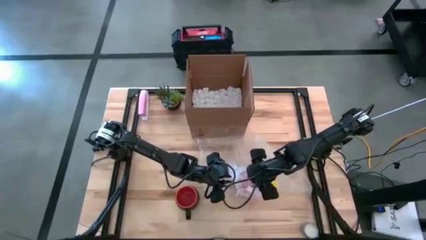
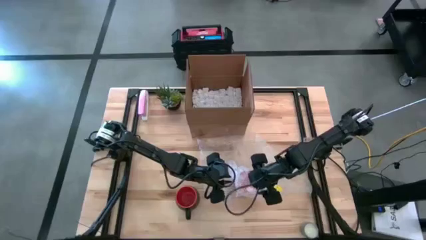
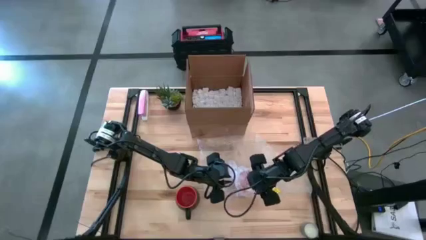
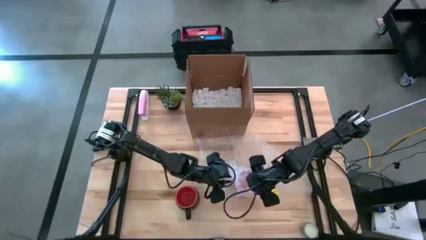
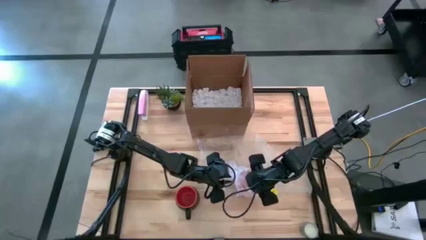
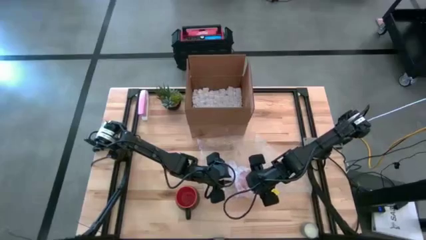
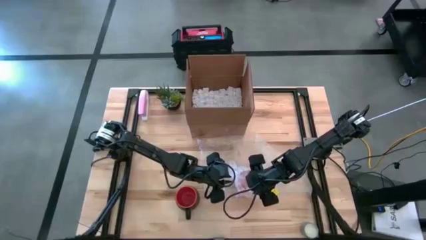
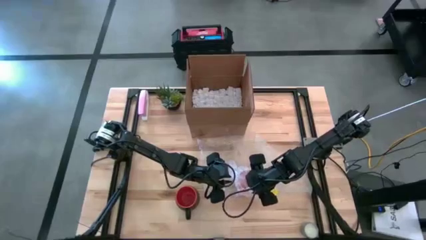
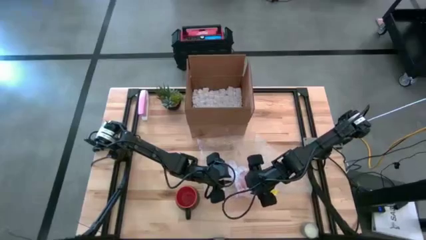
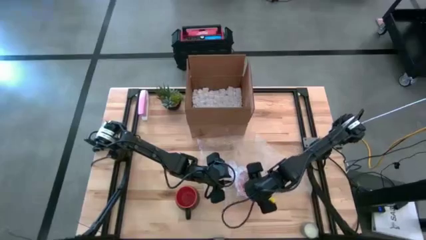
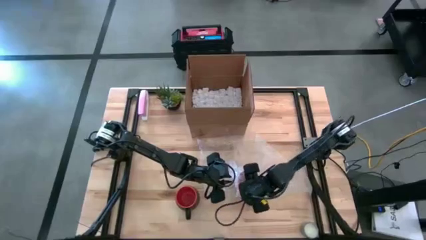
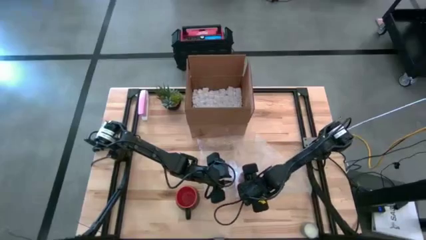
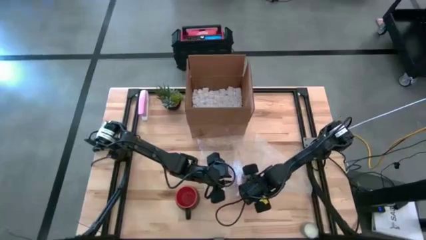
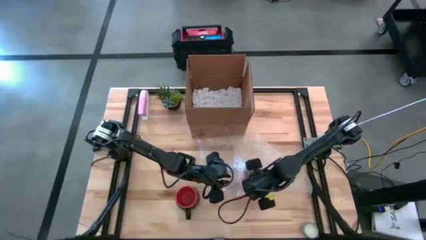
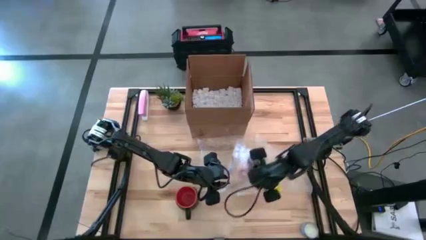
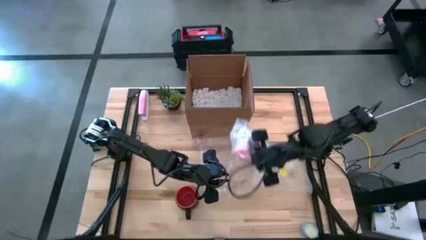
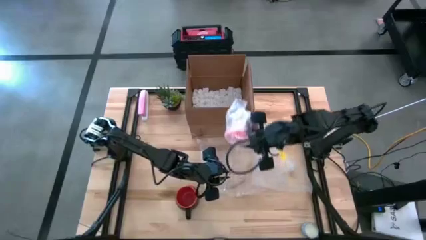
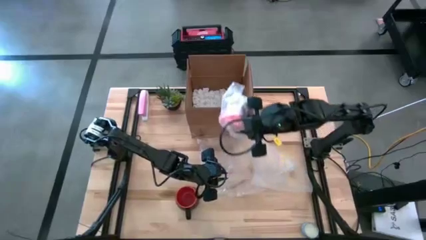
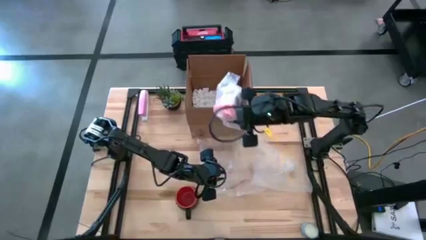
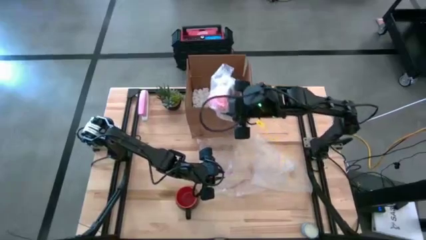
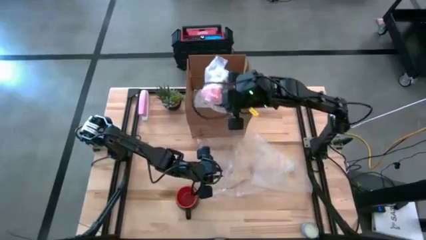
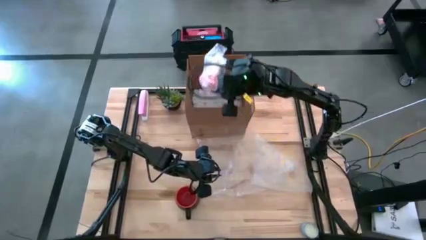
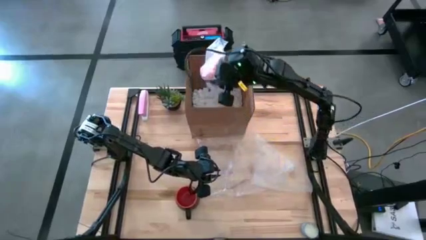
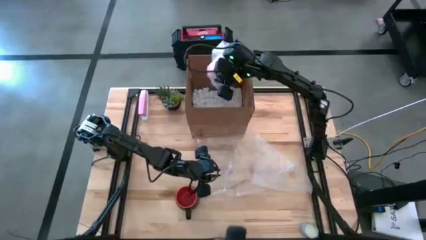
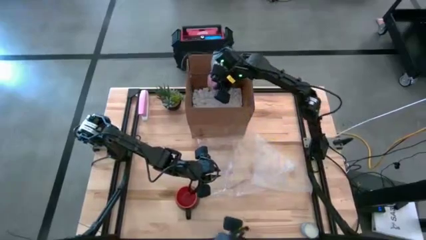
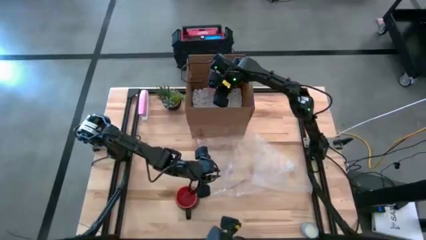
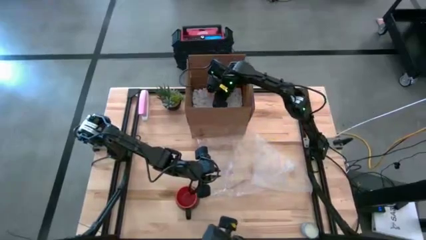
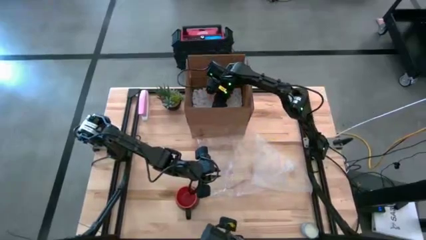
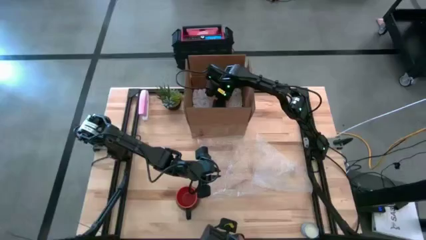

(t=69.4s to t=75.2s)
Task: wrap mug
Put the wrapped orange mug into the box

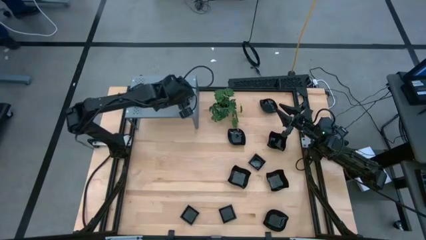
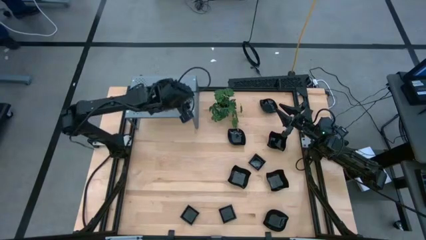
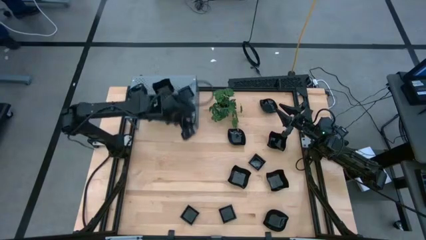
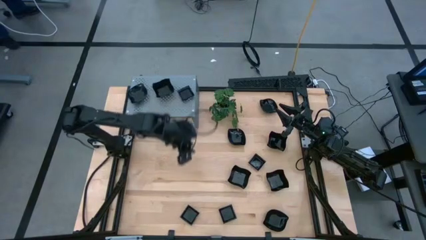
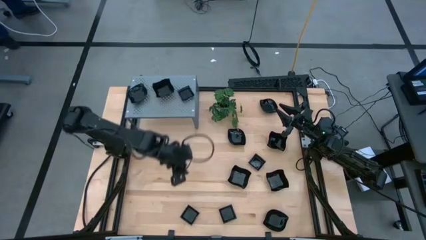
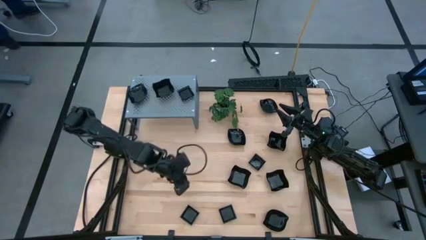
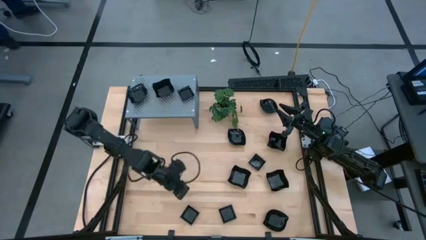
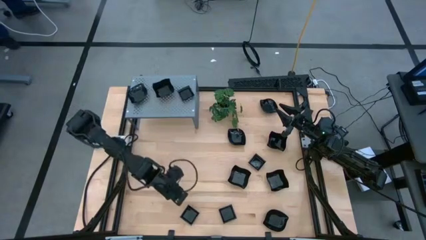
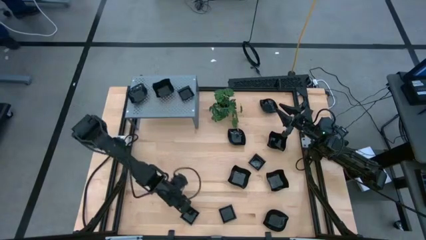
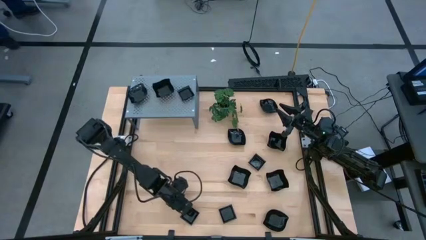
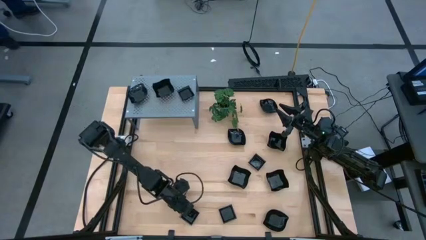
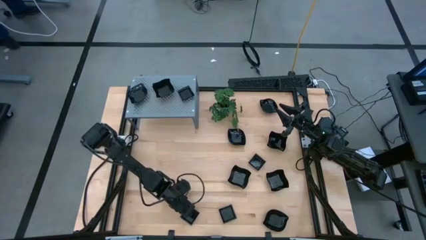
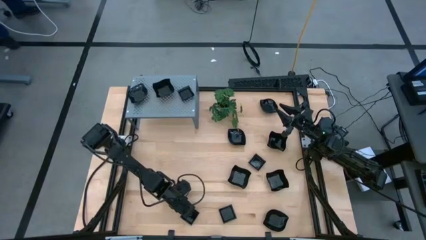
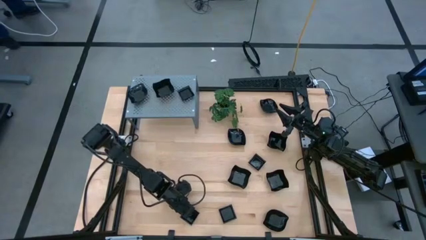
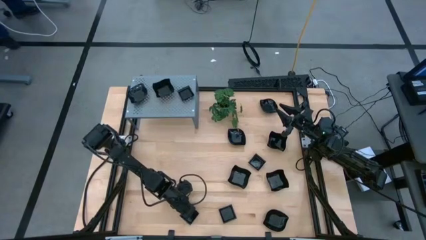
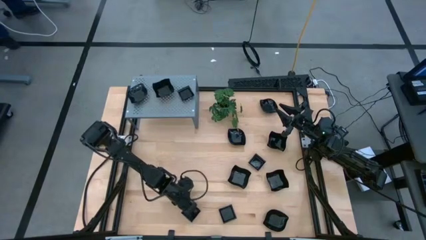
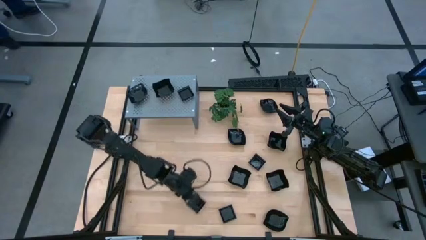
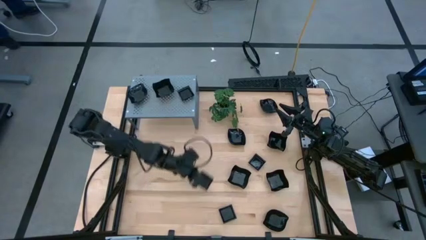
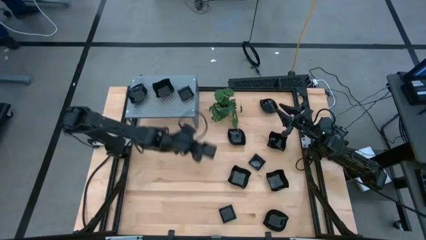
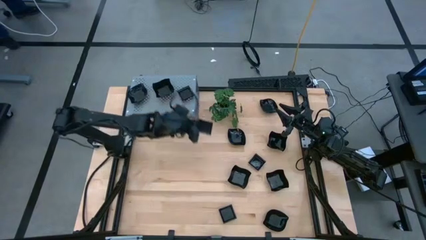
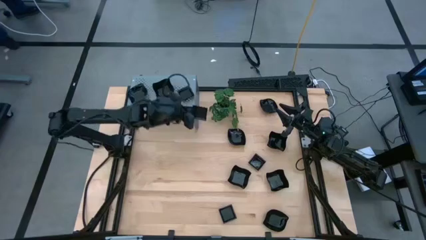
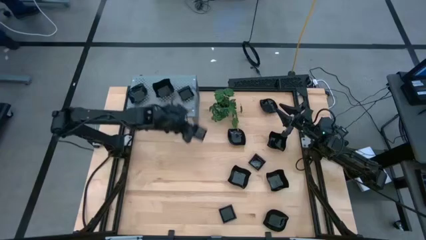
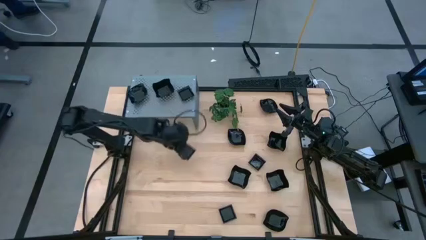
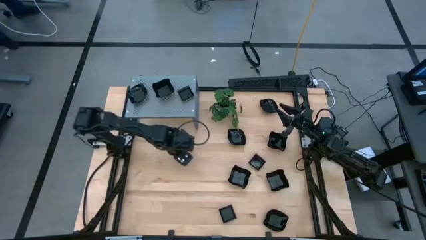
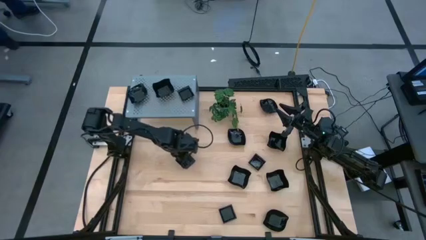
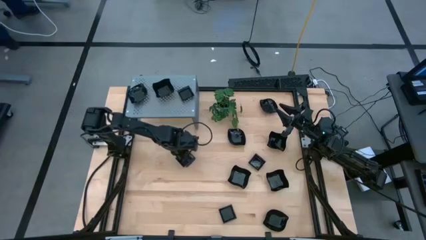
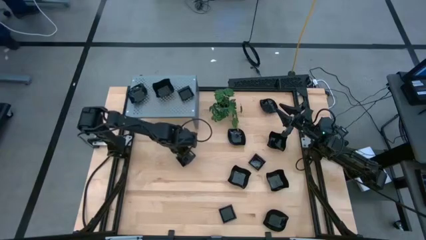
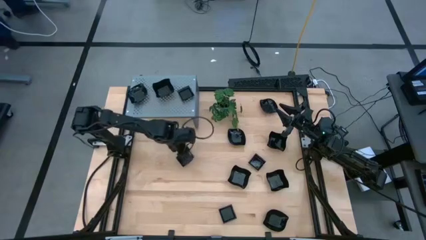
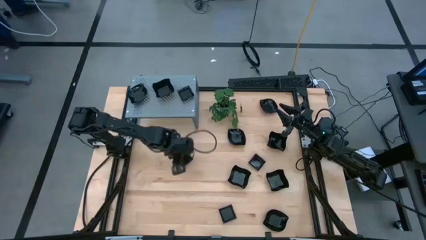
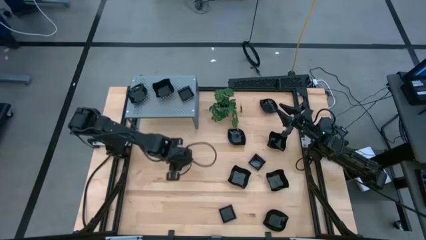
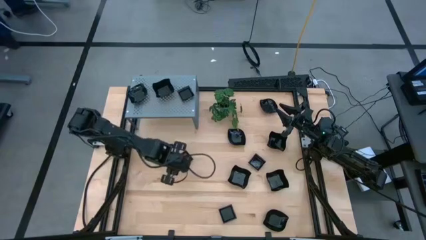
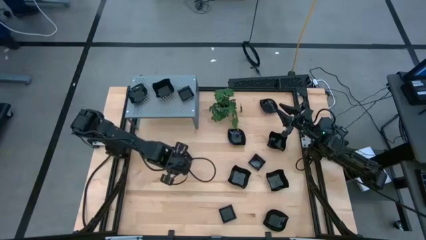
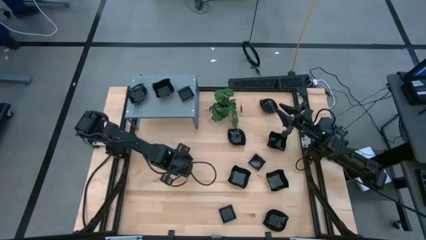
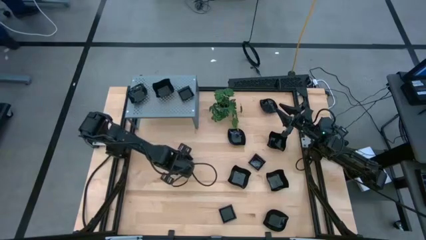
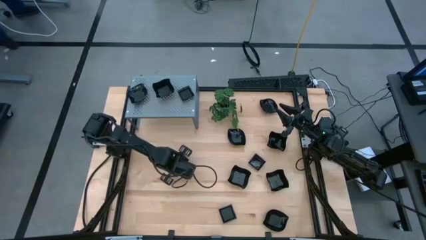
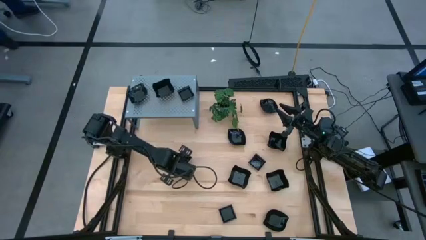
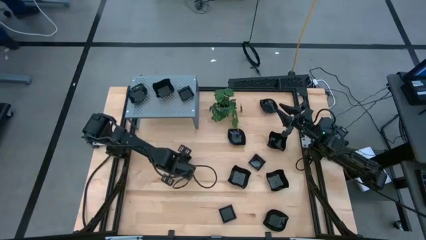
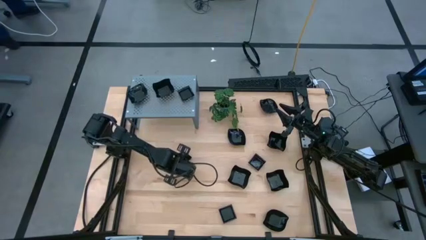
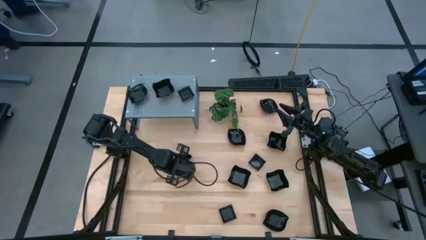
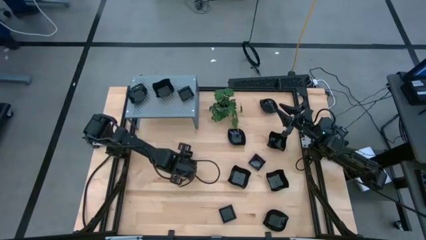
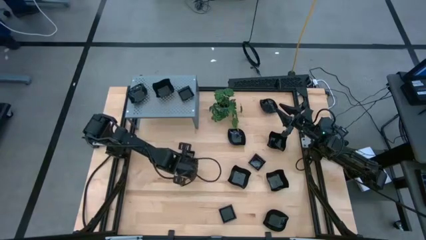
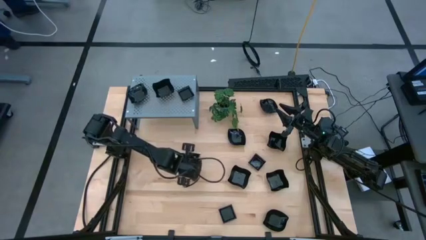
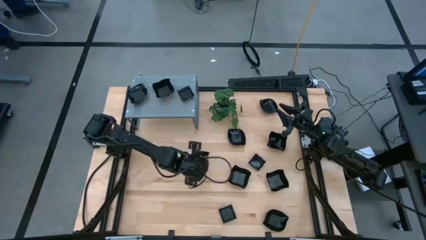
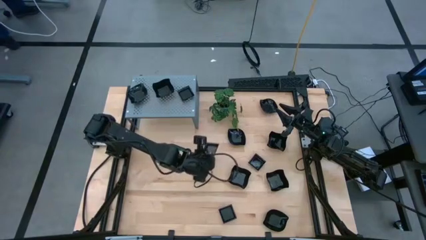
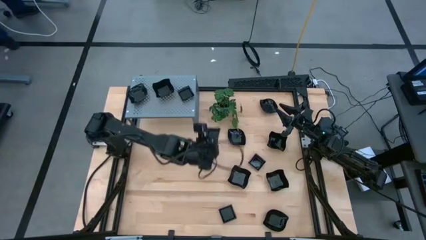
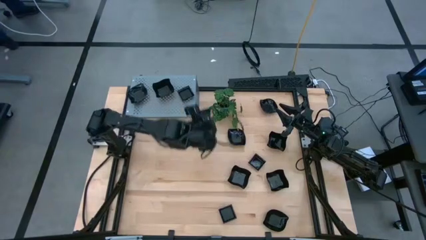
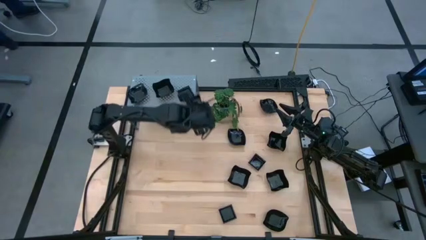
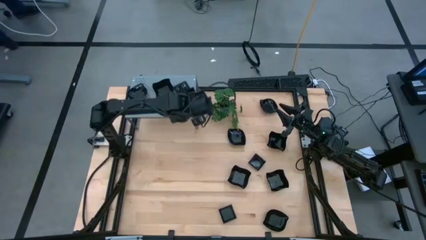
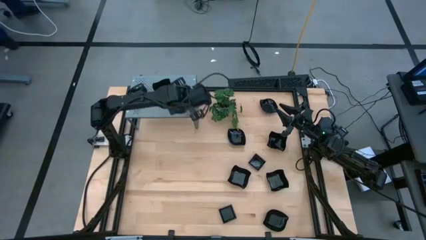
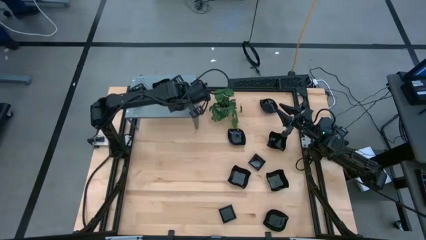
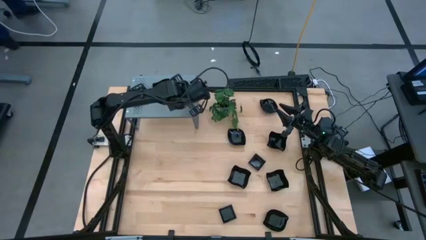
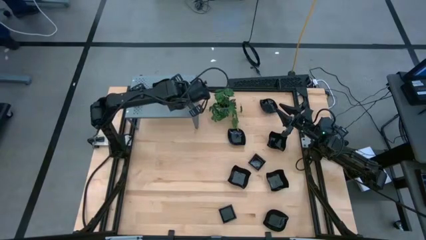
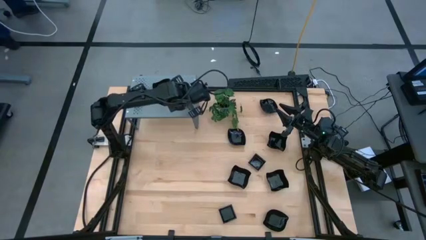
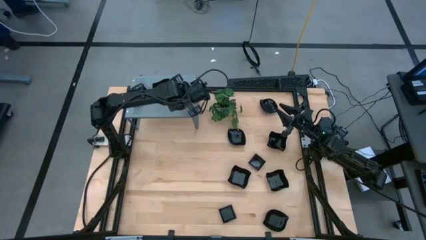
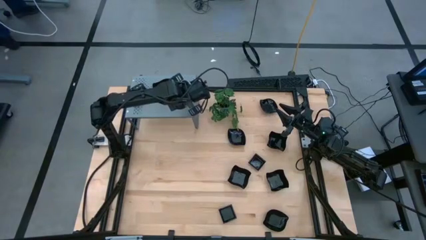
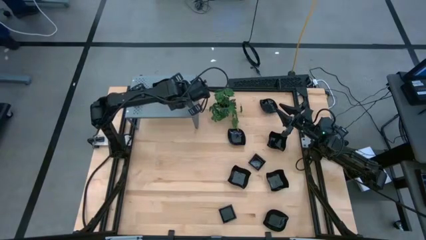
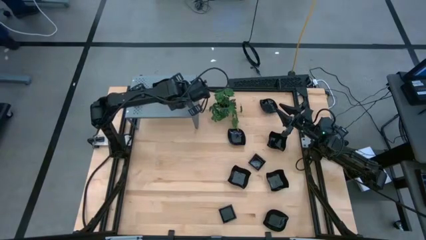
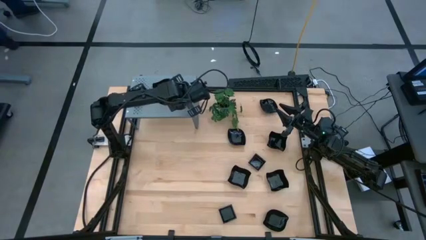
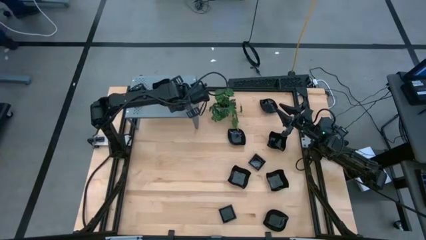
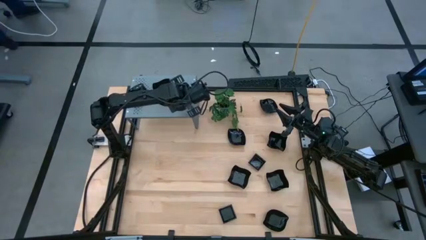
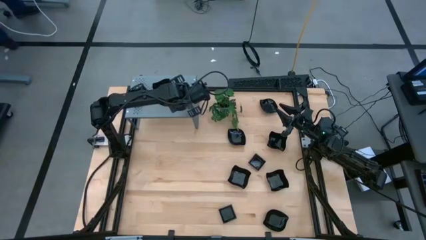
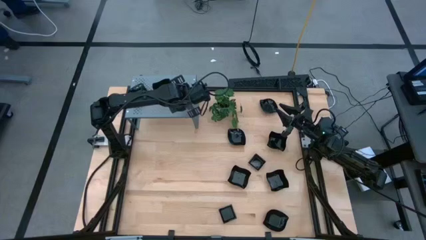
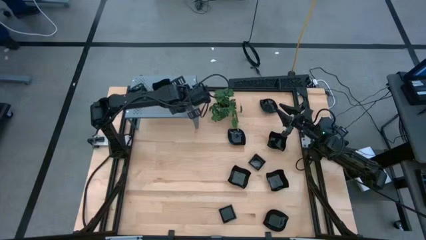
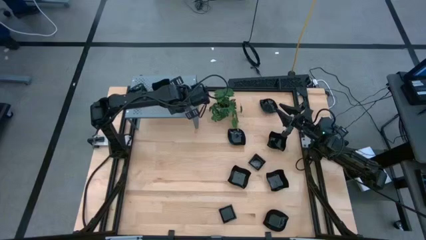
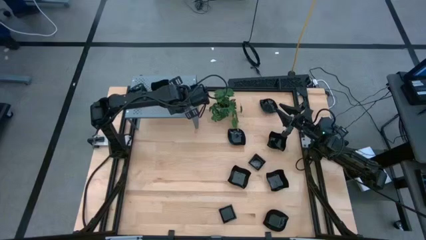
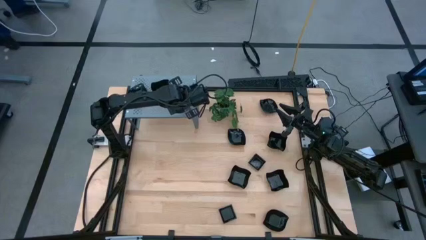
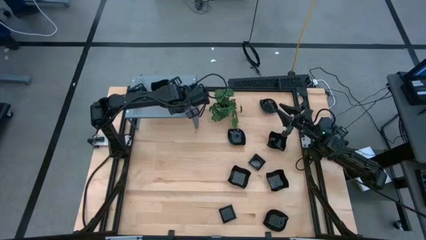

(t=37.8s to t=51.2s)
Task: Pick & Place Mini shaped plates
Stack the black leaf plate on top of the black leaf plate on the shelf
